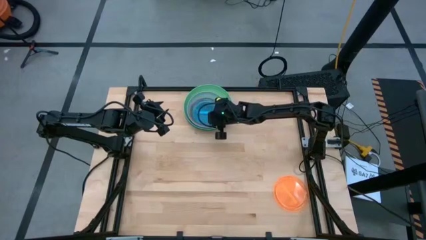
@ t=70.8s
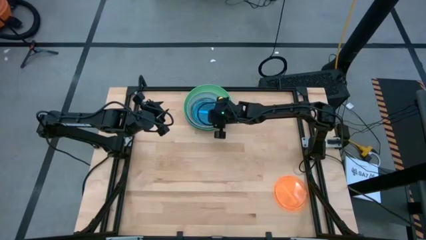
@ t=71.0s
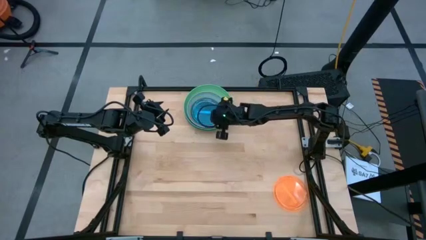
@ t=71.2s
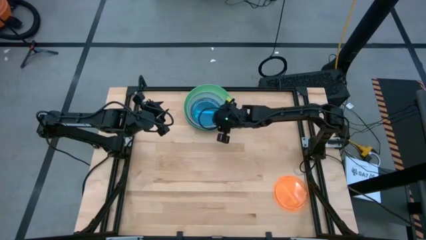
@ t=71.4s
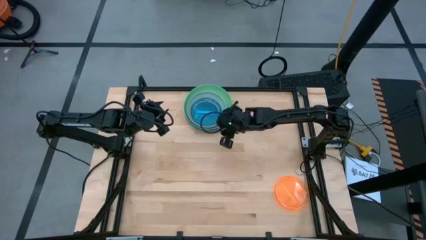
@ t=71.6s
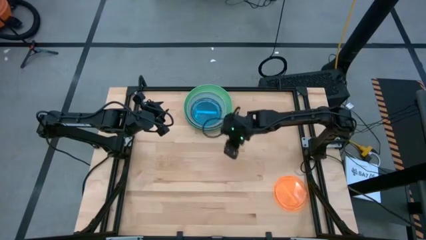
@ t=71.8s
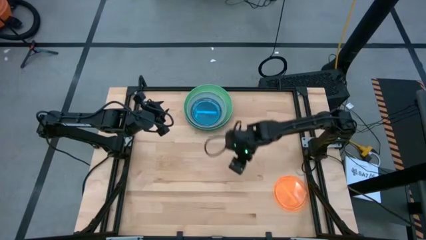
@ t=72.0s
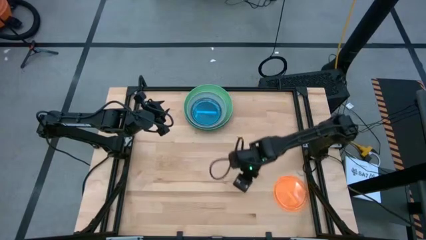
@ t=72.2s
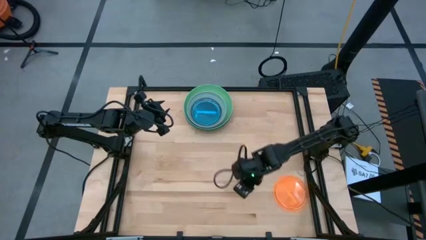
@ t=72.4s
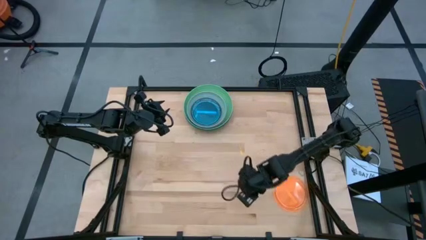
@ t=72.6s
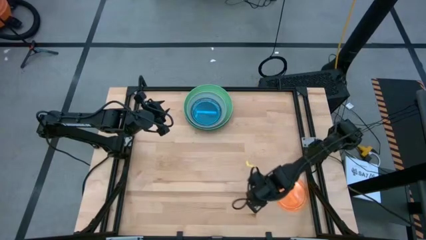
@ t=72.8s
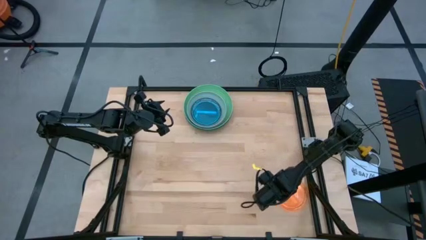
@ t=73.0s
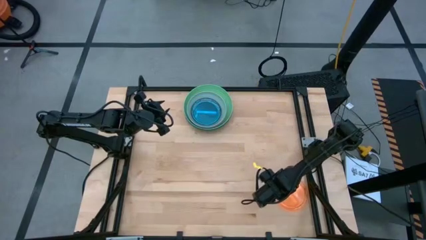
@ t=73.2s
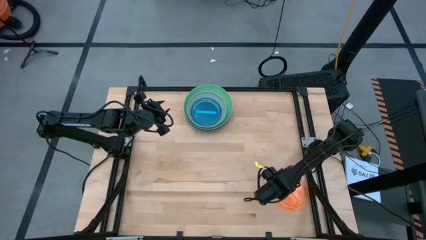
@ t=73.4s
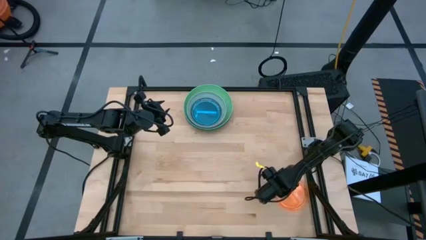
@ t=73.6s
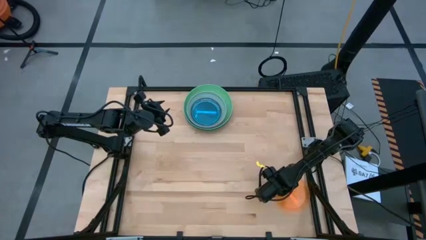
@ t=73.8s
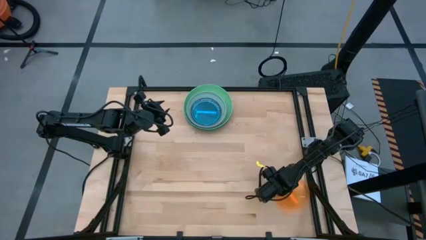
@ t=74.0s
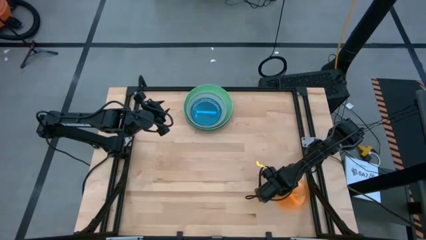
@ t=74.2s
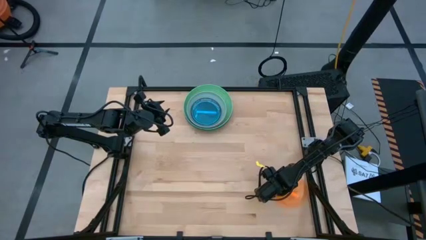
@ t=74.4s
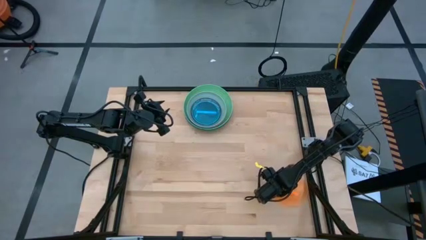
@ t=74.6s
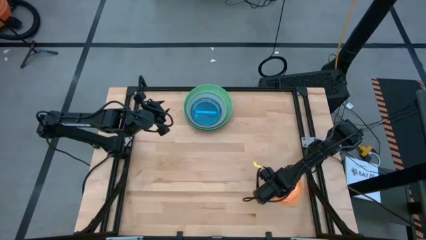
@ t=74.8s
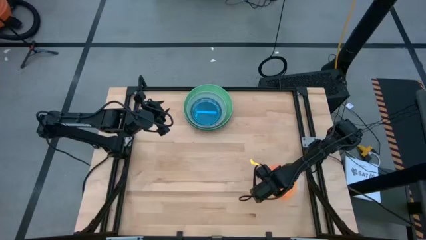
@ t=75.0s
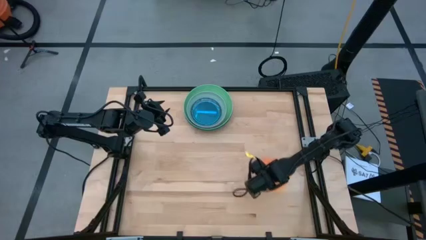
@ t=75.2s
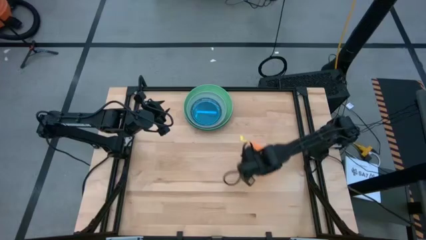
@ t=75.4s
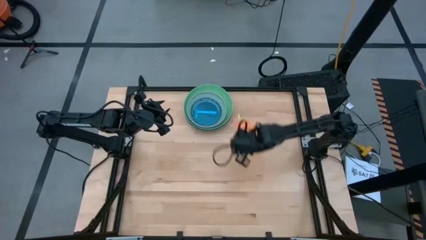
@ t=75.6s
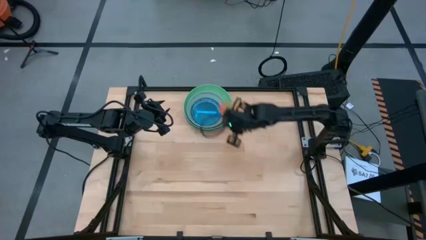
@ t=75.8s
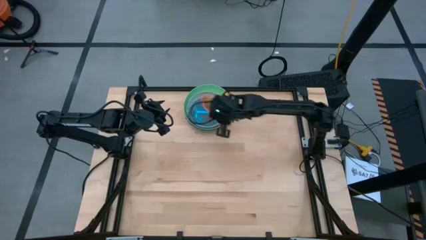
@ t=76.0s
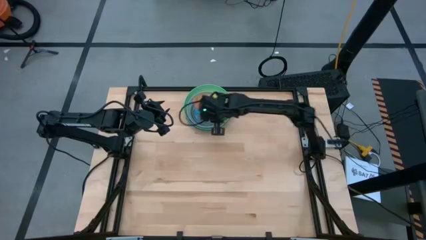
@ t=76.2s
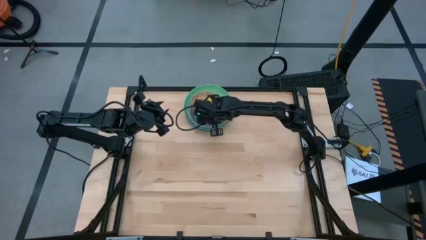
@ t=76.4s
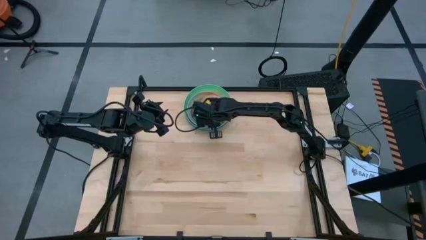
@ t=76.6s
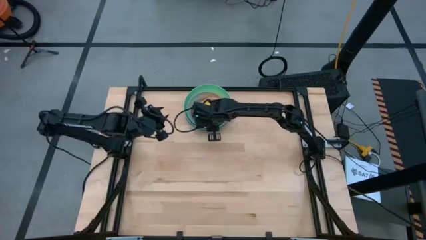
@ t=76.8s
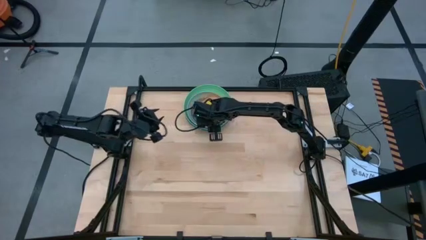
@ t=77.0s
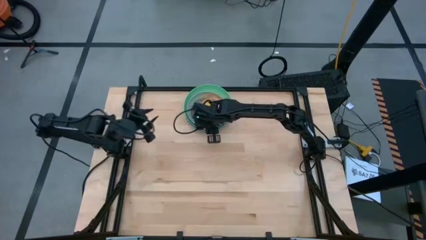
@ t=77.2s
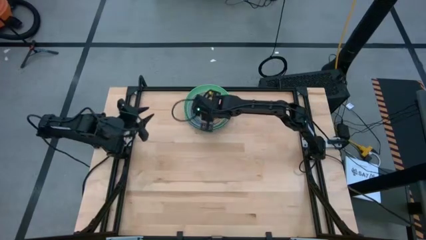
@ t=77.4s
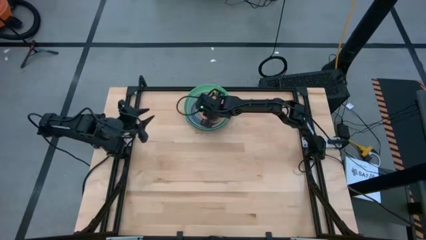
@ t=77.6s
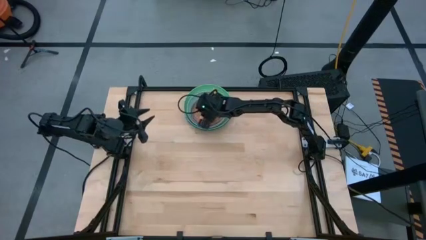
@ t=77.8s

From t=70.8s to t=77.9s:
Task: Stack plastic plates
Stack the orange plate on top of the blue plate

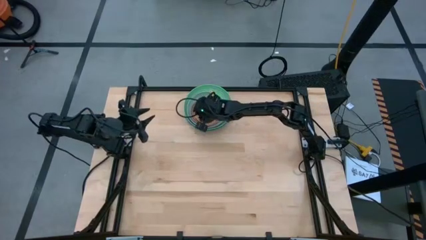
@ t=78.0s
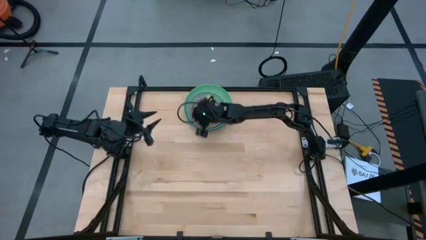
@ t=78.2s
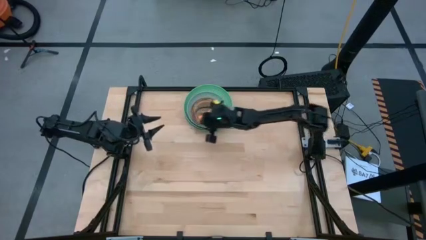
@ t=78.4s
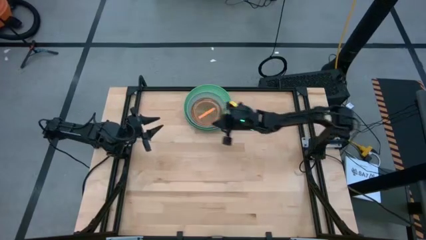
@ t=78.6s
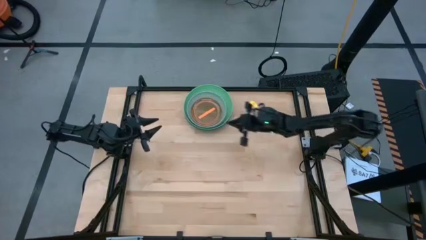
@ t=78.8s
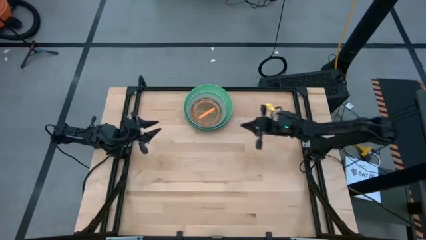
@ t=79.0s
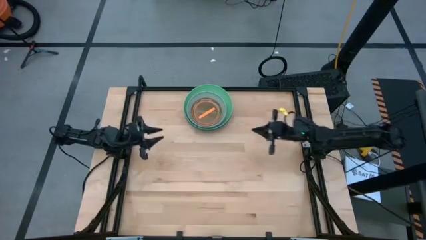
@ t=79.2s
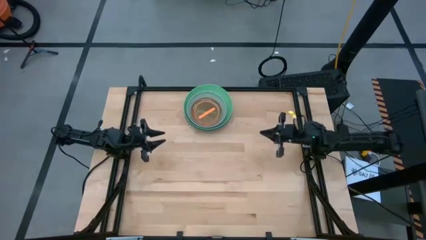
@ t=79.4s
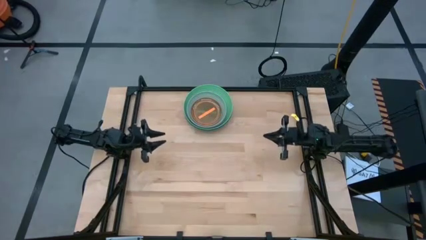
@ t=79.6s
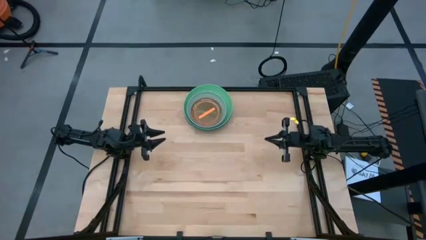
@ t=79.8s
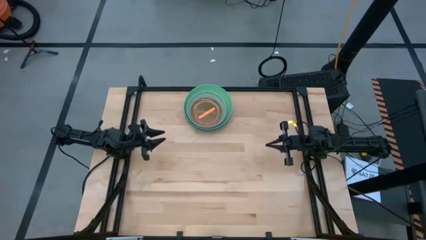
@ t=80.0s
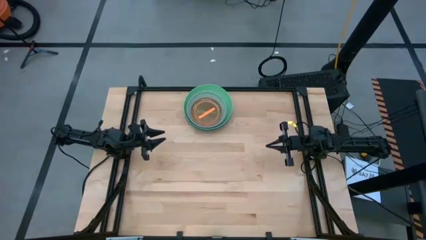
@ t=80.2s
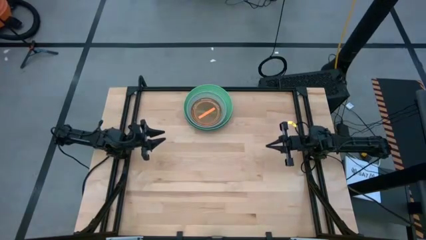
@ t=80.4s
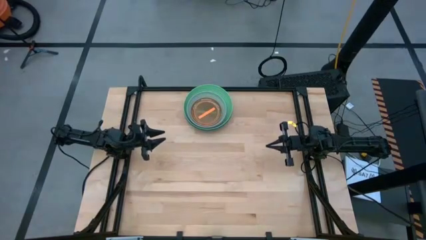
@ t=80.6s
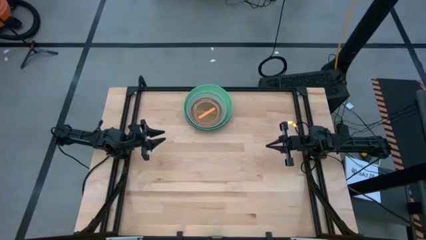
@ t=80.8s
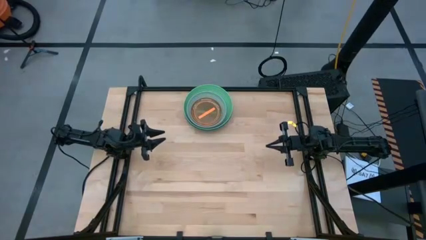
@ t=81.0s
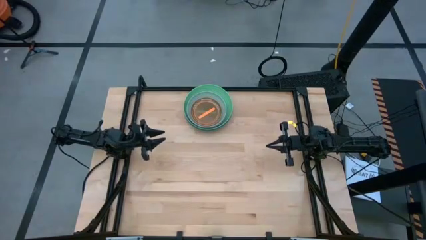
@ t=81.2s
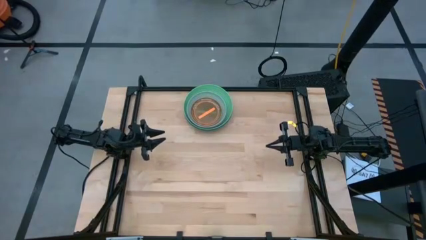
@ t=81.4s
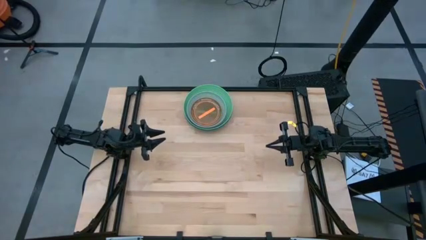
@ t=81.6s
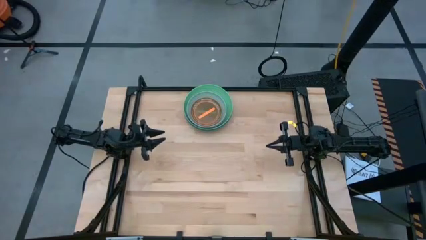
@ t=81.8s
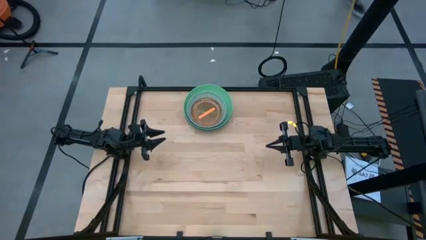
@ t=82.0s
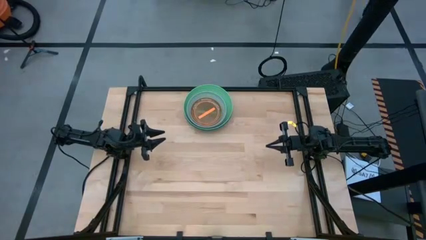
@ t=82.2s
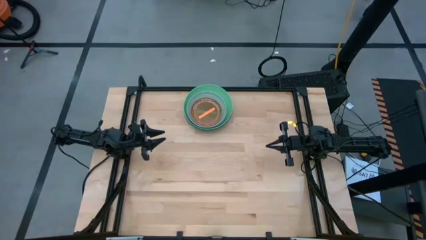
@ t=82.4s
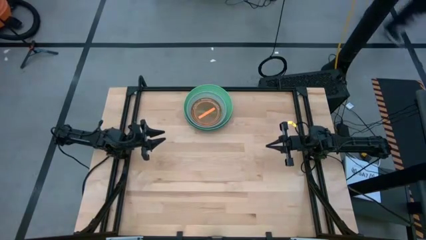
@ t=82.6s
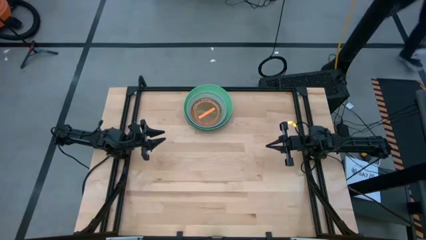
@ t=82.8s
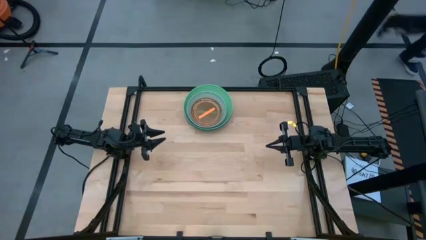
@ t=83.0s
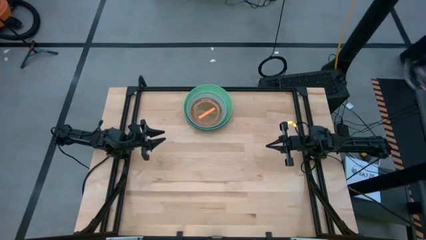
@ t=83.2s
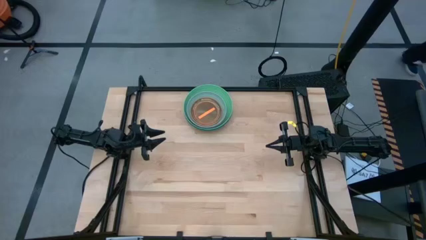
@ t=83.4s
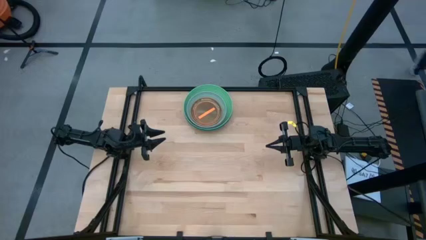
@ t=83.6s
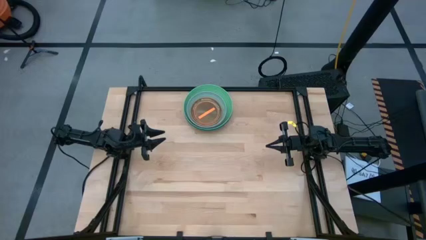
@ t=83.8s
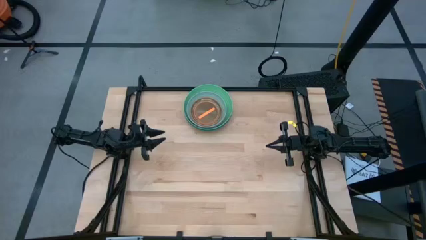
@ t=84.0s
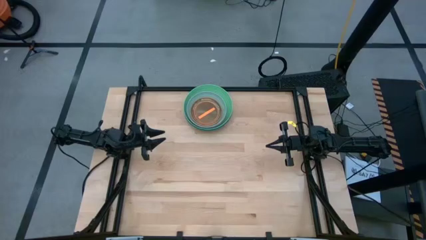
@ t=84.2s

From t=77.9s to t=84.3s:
Return to Home Position

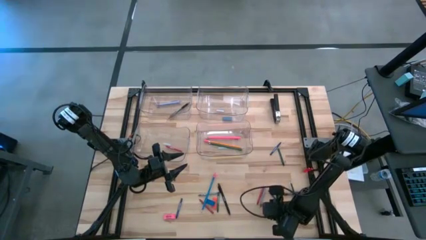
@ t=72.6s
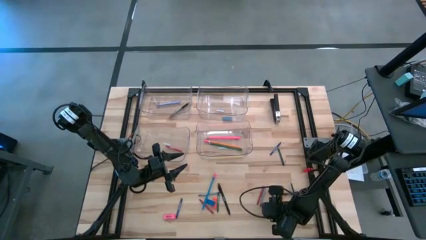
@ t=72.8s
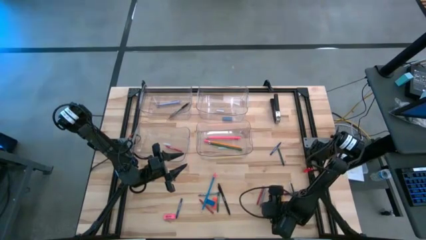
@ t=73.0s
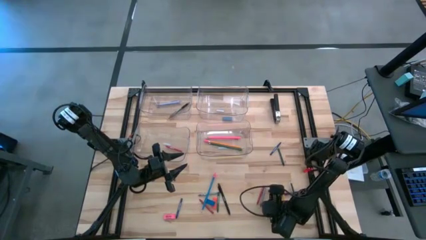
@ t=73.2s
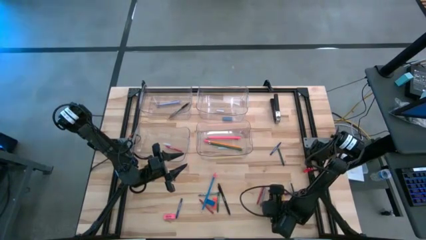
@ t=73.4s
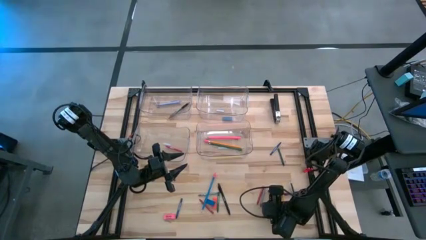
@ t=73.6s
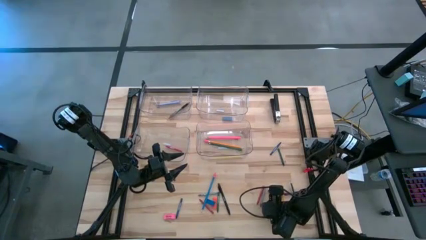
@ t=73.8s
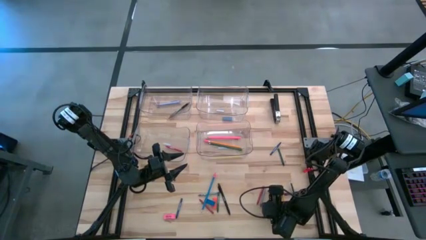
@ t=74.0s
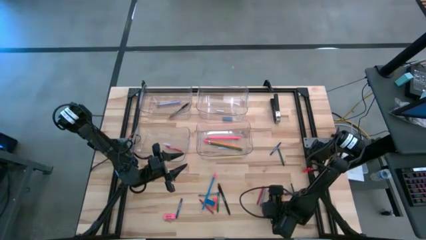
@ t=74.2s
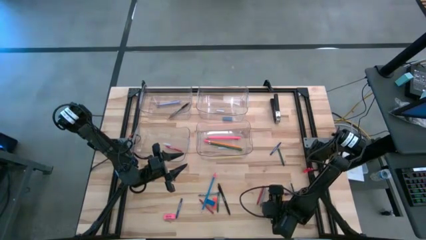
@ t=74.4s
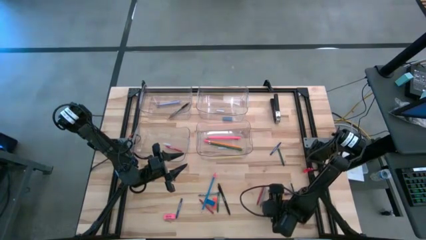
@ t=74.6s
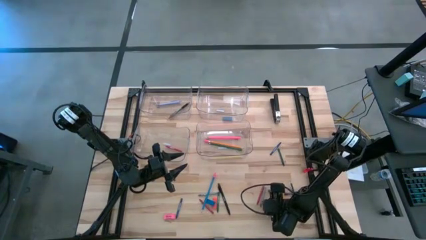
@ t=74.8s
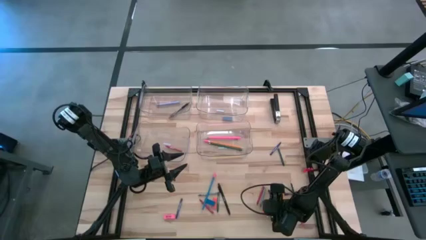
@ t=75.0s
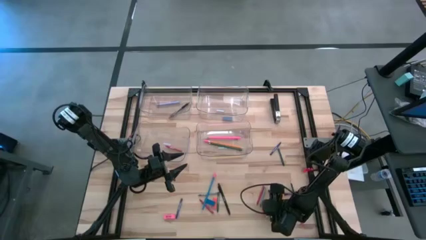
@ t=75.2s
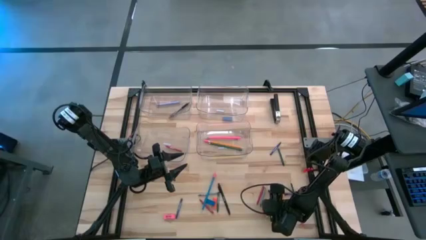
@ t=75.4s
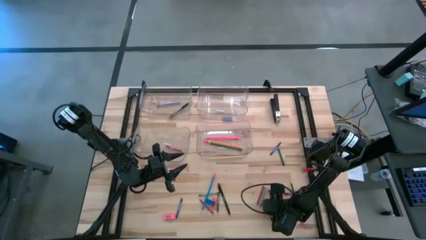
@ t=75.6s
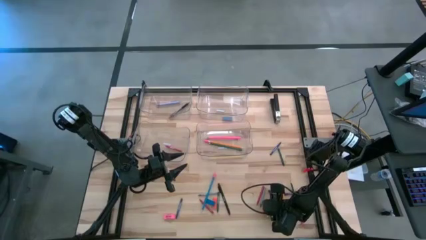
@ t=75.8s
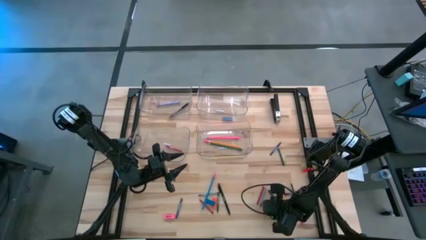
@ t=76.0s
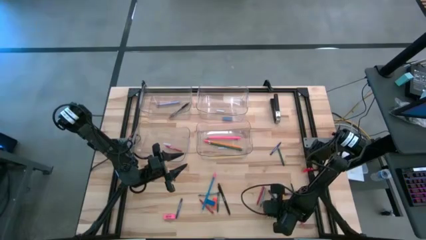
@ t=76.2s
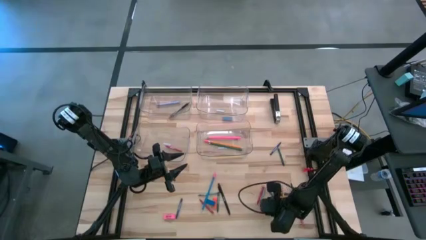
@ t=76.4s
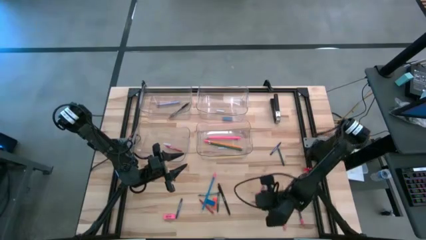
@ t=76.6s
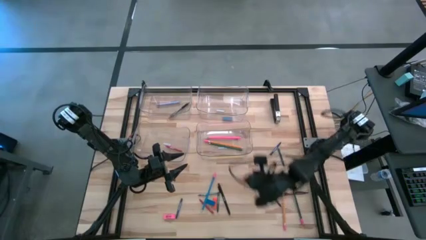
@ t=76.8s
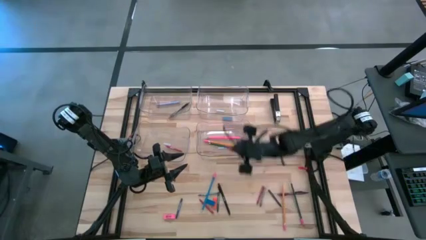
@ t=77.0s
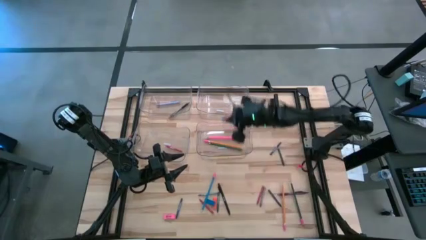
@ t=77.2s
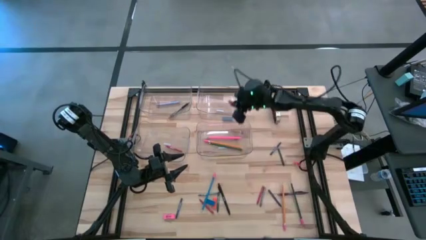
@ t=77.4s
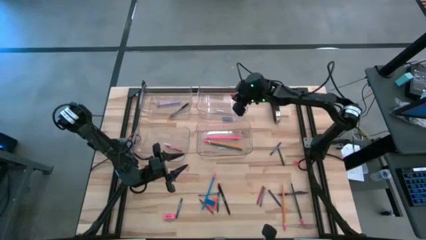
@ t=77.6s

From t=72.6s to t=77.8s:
Task: Sort crayons/erasers/pens/pencils in bins
Put the right orange eraser into the top right transparent bin
